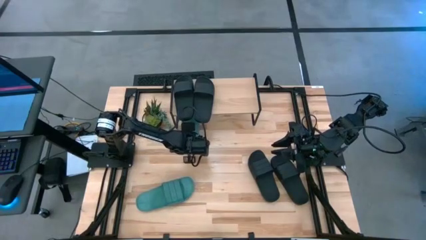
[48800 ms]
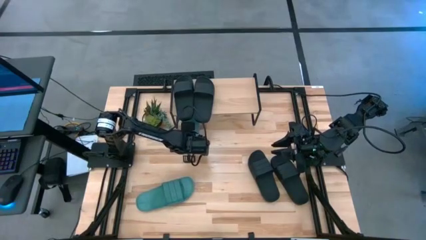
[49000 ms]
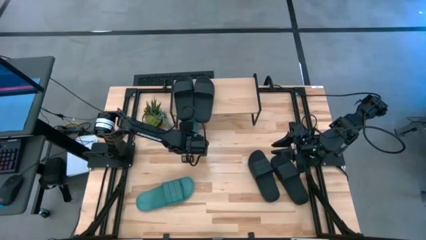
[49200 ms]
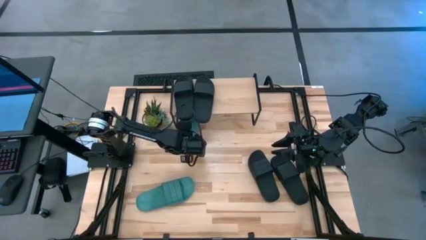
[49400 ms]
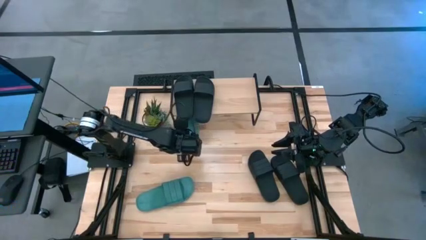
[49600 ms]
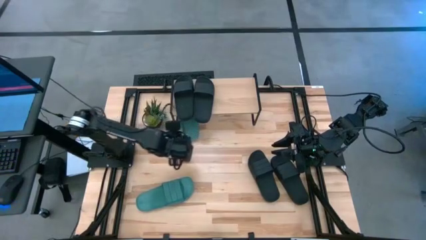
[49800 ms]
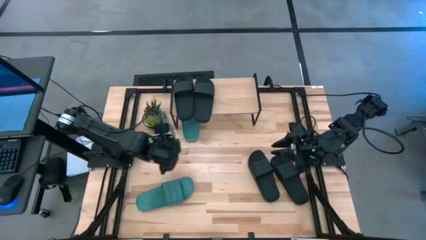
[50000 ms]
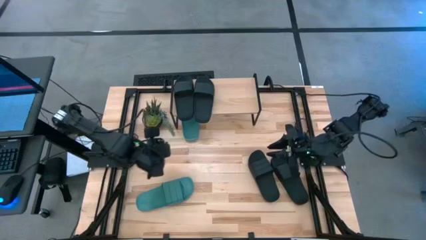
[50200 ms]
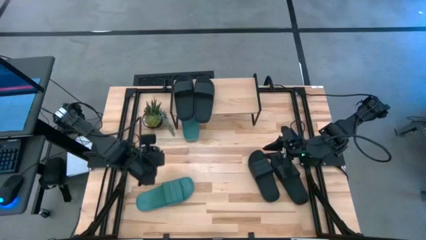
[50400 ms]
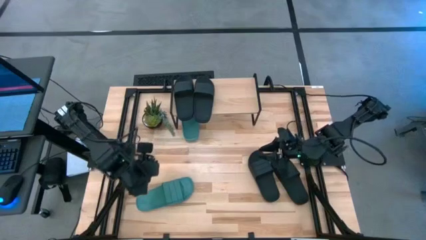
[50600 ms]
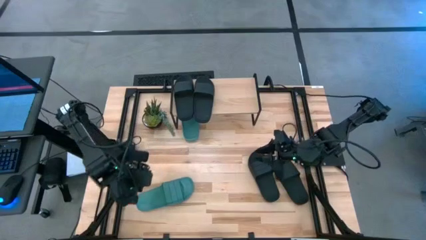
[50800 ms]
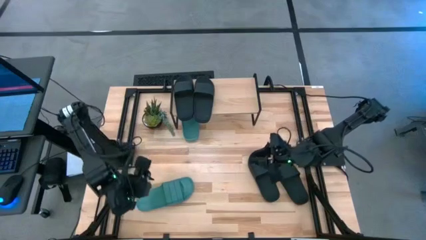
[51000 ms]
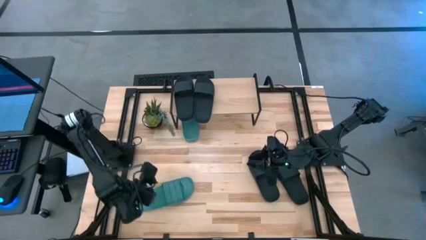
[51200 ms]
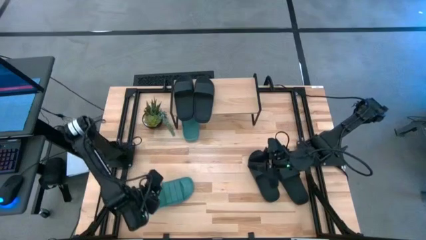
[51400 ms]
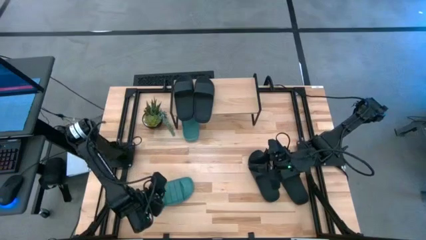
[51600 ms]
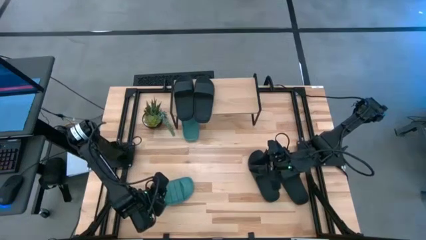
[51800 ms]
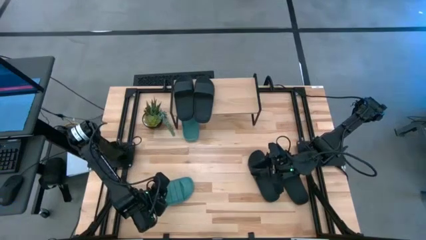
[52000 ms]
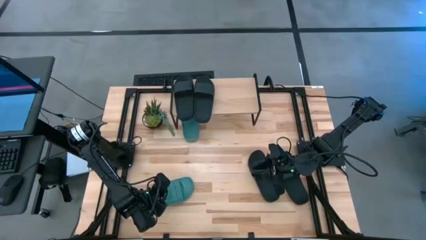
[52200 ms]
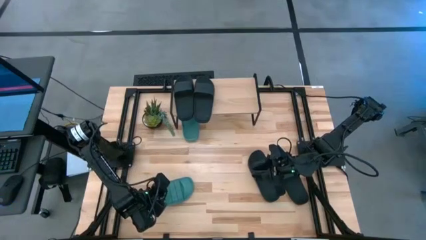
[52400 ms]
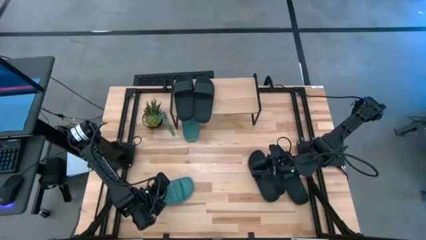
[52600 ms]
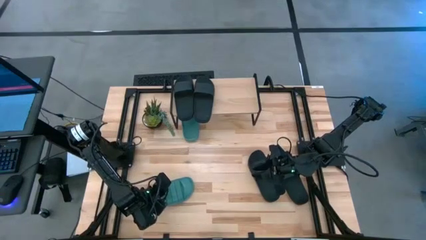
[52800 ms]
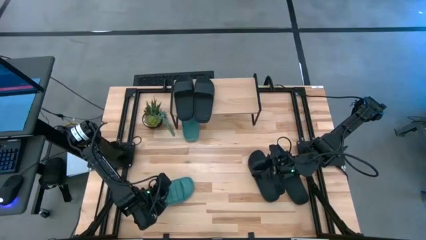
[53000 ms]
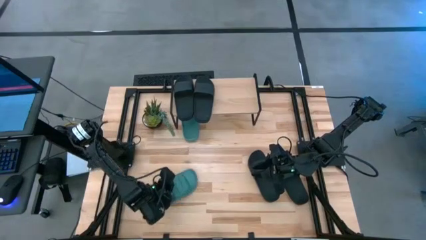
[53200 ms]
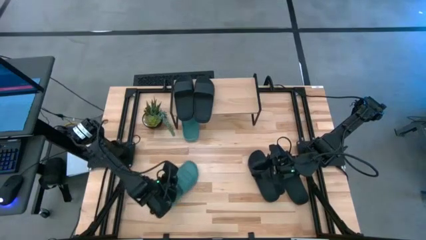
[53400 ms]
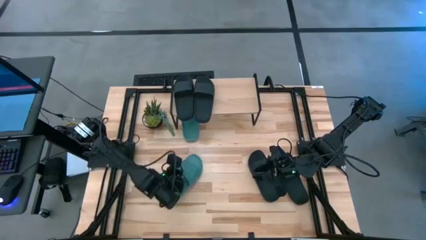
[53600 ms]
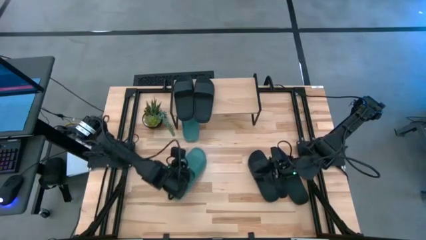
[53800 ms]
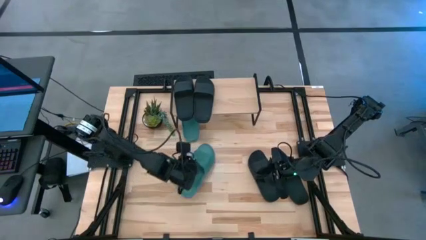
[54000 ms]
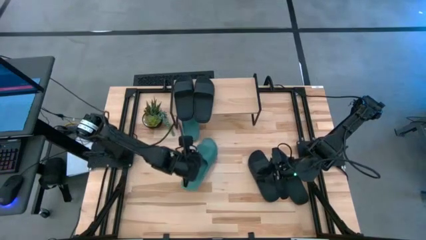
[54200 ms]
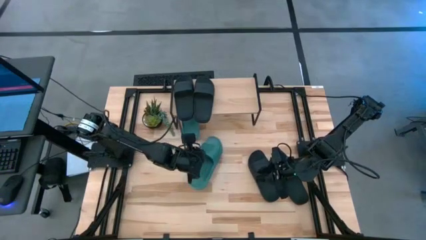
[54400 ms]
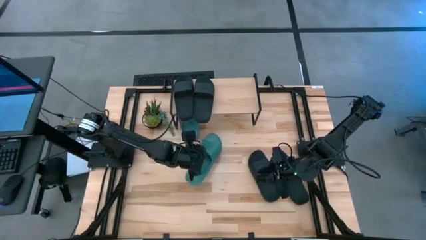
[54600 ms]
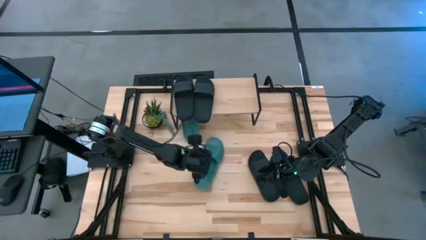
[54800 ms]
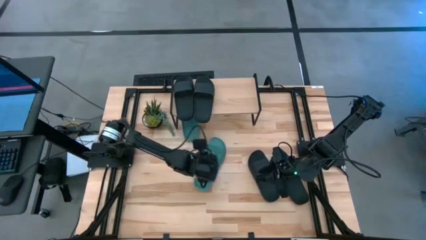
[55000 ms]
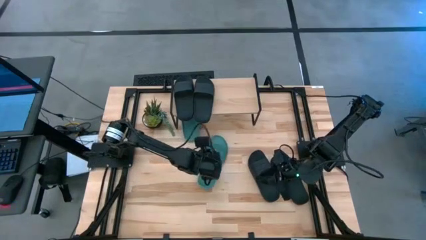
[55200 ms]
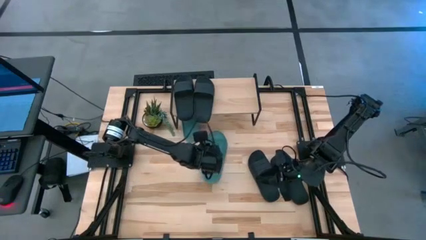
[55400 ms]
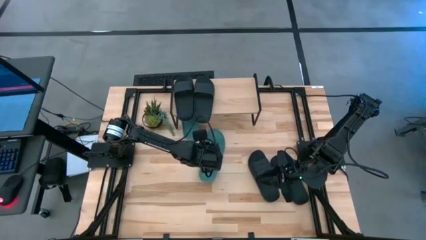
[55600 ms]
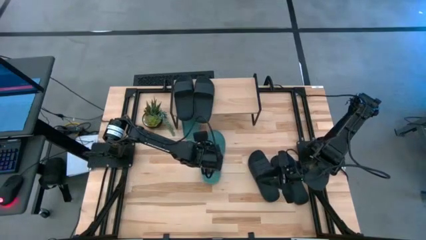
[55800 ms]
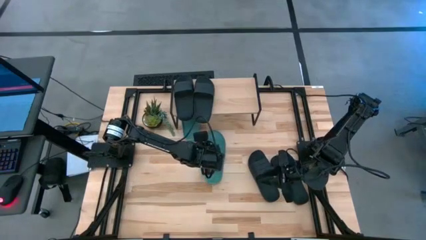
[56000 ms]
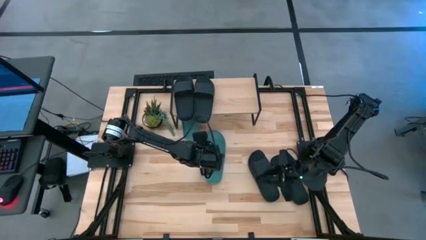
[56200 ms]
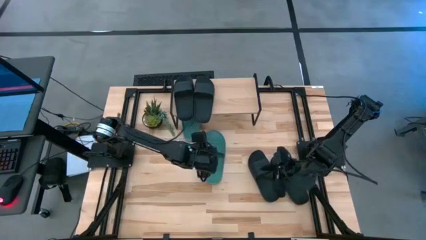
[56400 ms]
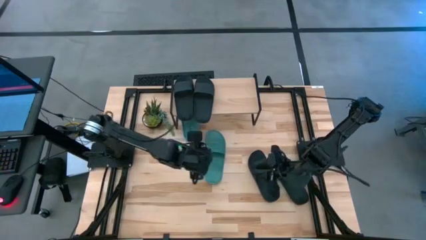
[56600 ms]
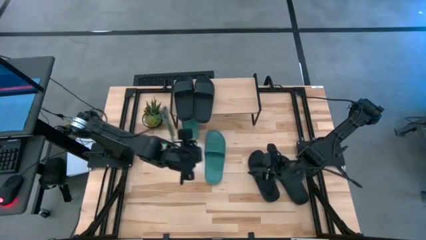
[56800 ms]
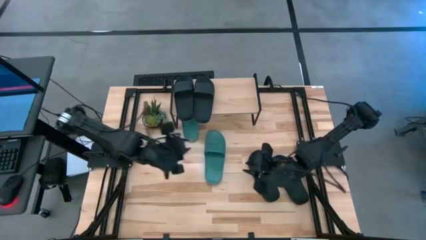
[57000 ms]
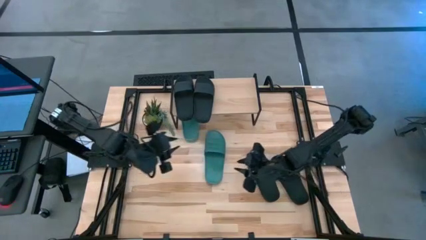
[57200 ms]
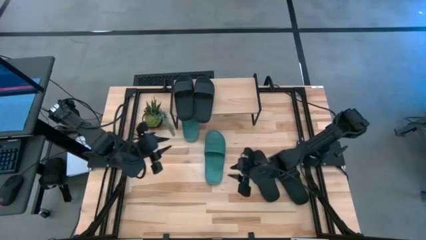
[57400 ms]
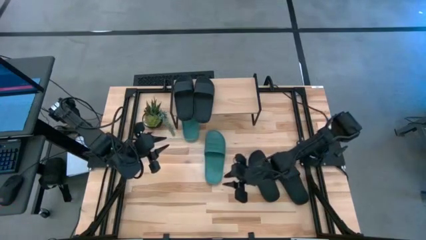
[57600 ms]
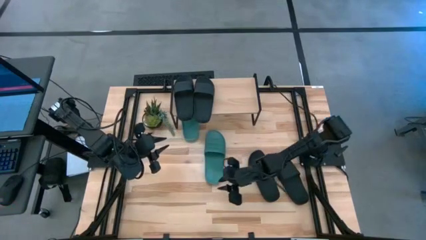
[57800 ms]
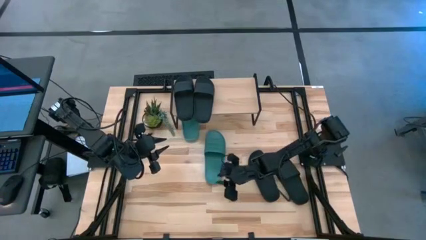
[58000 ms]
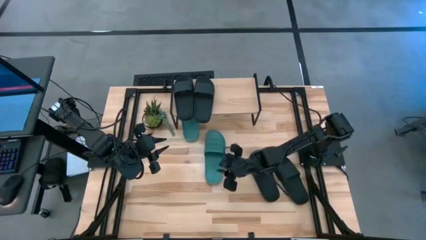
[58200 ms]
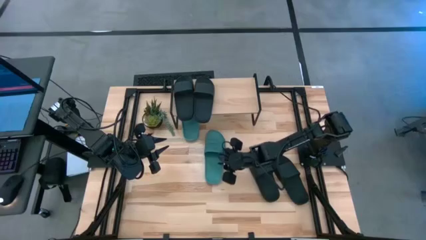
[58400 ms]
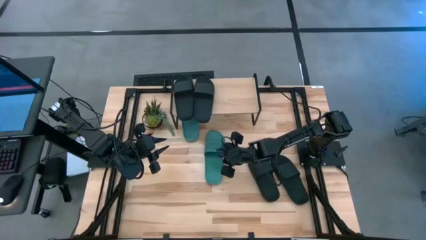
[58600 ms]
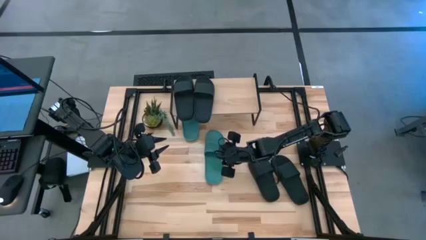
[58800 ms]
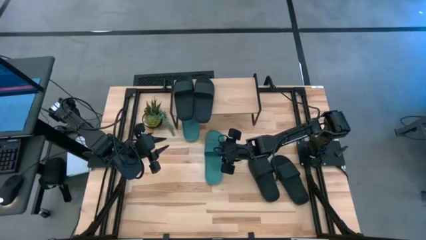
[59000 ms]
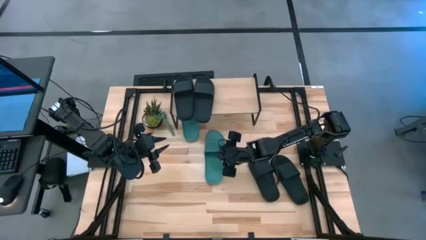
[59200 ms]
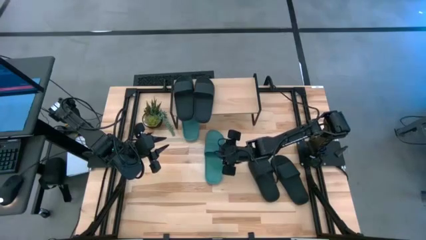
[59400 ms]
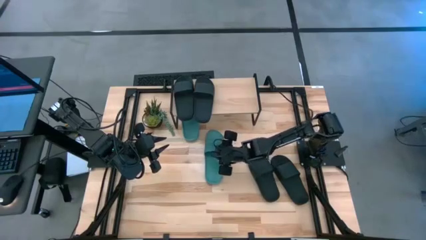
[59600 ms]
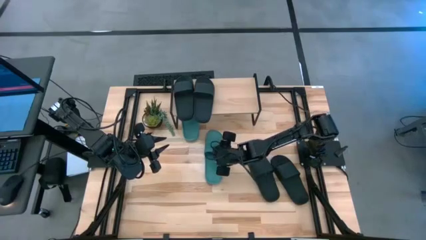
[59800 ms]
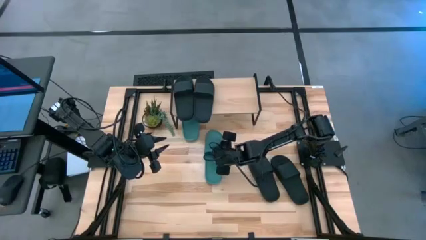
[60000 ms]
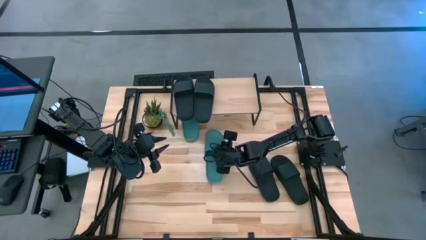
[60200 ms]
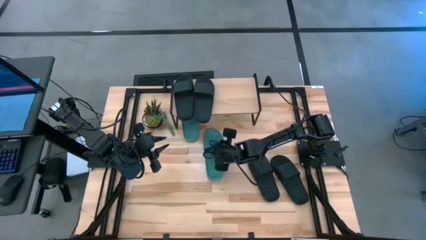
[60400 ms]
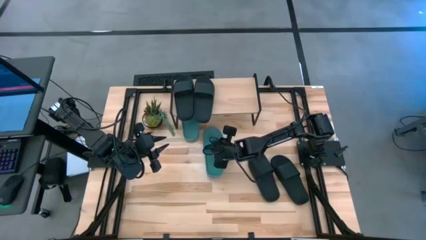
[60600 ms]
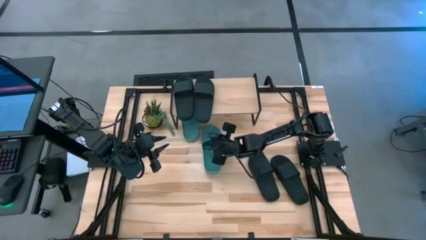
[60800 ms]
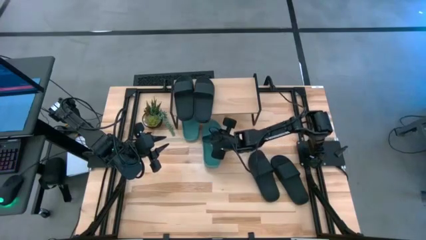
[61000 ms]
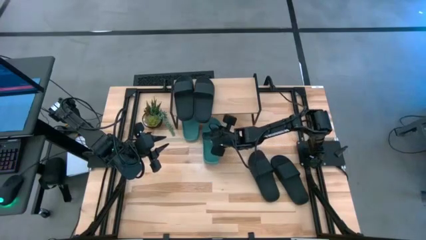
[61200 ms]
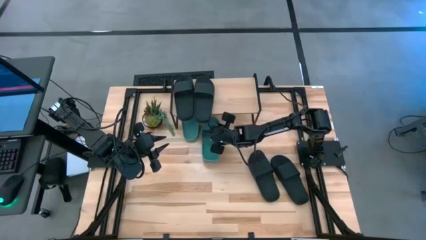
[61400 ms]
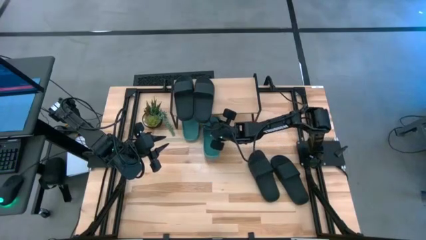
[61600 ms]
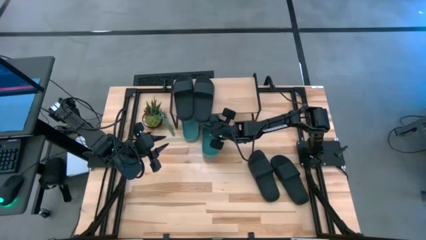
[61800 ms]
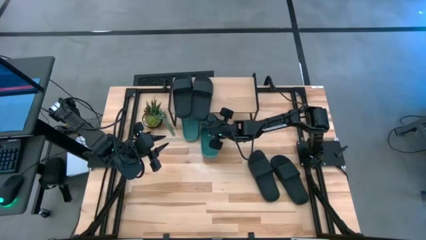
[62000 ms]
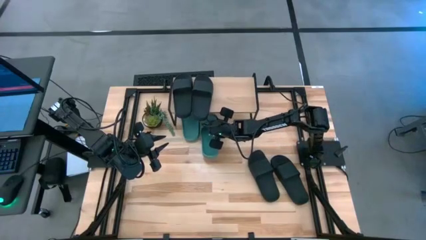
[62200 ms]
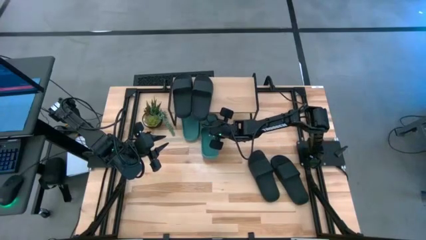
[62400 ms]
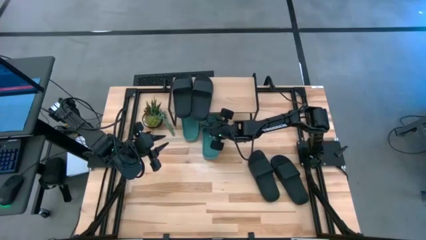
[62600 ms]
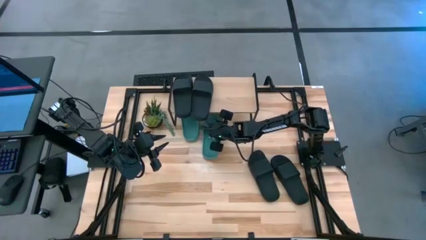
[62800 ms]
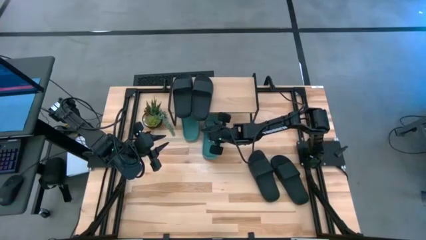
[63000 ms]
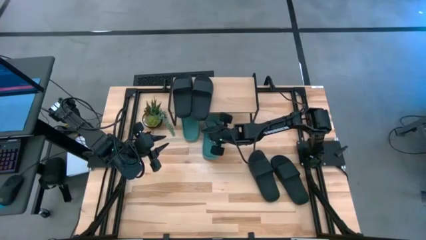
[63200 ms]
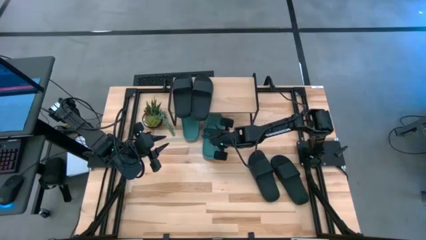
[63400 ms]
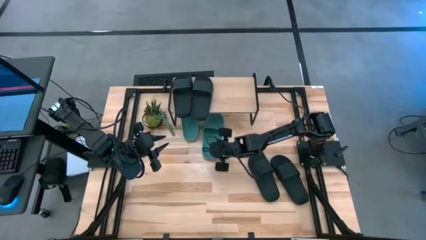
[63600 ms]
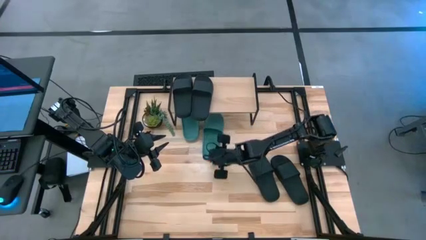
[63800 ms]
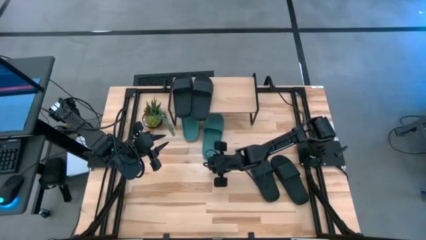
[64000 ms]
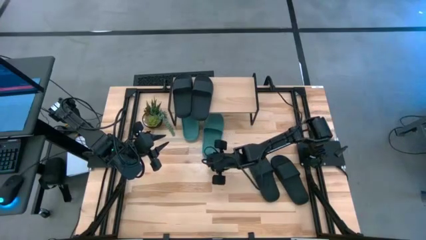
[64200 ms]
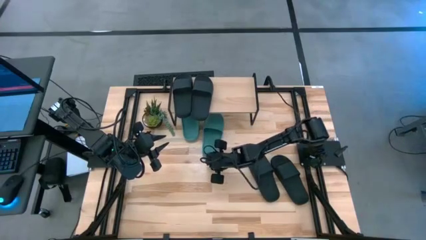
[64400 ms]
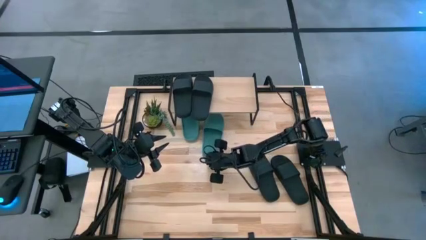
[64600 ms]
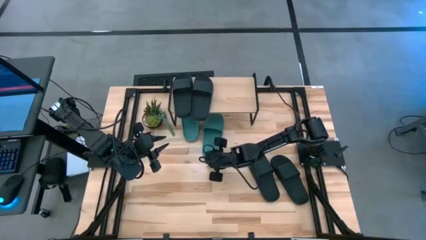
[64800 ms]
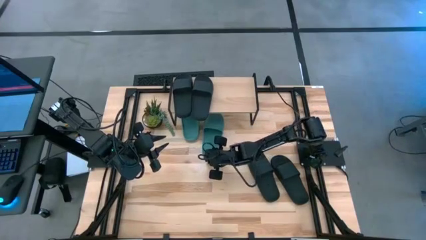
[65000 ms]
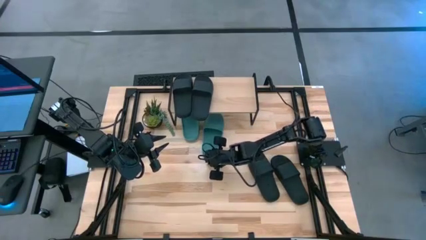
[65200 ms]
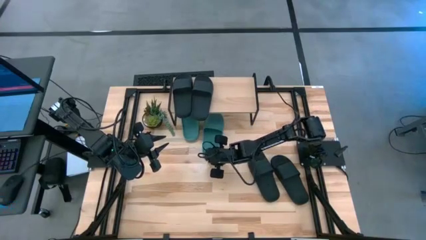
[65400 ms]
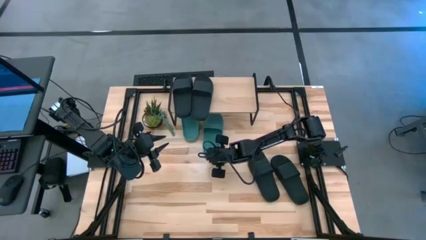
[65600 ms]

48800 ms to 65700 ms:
Task: Pick and place slides into the shelf
Put the blue slide under the shelf
